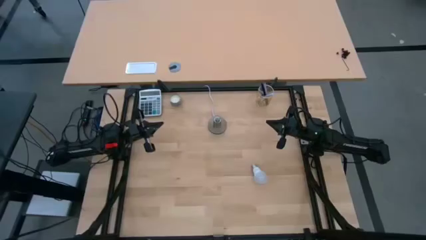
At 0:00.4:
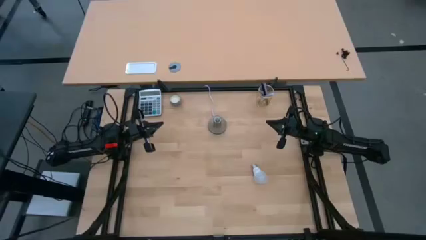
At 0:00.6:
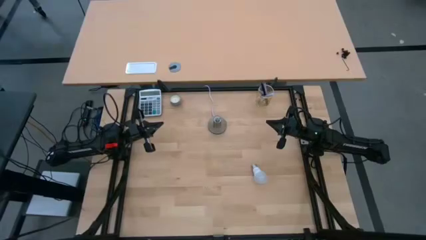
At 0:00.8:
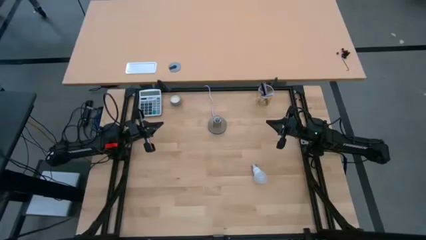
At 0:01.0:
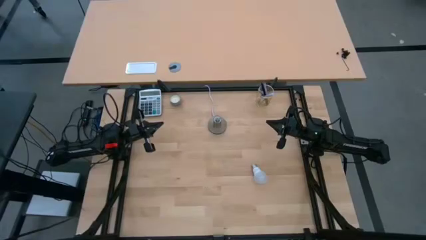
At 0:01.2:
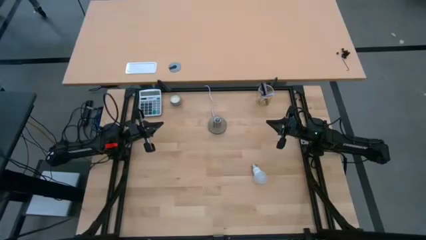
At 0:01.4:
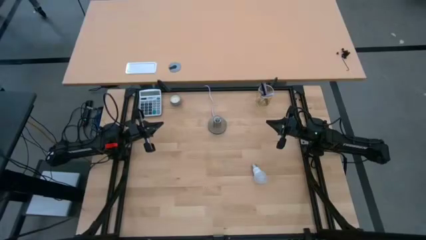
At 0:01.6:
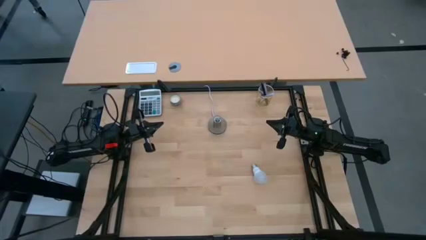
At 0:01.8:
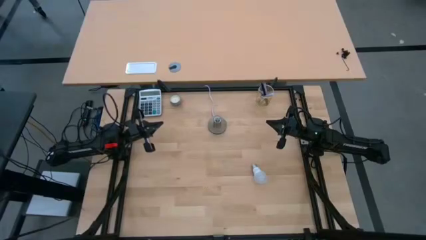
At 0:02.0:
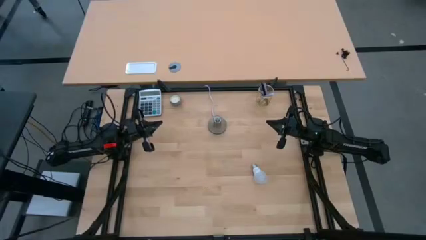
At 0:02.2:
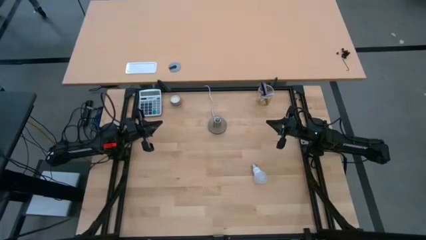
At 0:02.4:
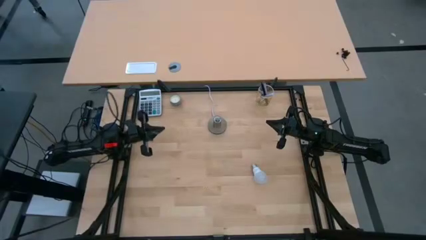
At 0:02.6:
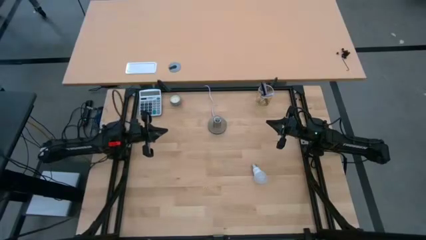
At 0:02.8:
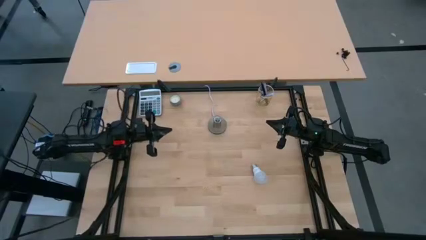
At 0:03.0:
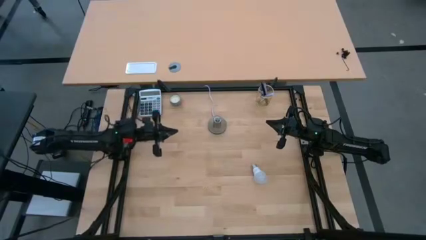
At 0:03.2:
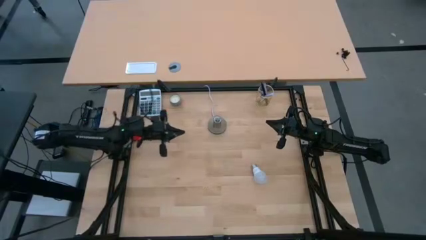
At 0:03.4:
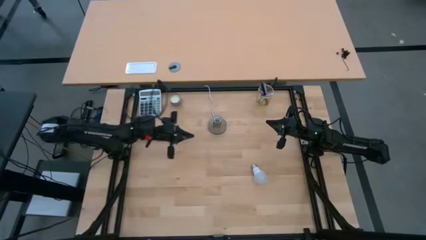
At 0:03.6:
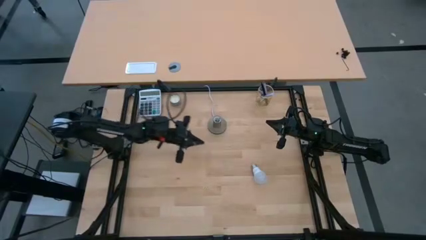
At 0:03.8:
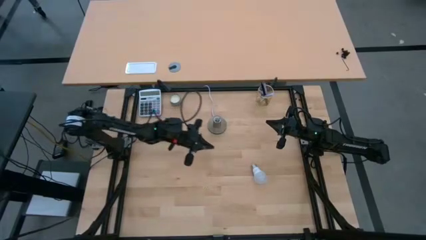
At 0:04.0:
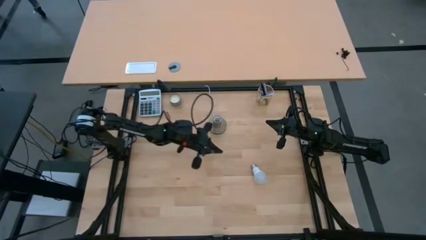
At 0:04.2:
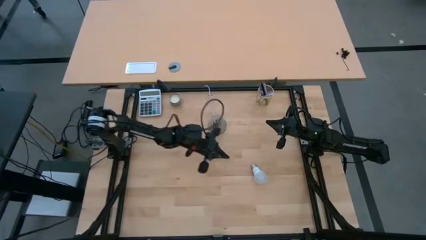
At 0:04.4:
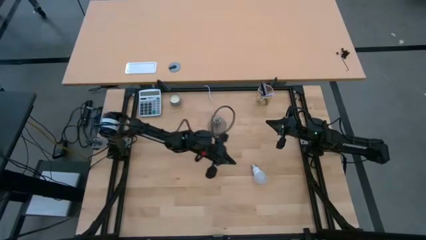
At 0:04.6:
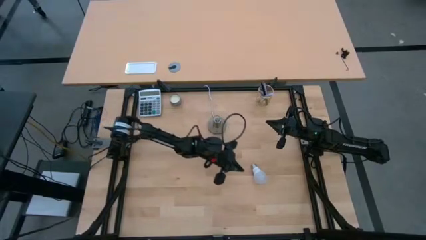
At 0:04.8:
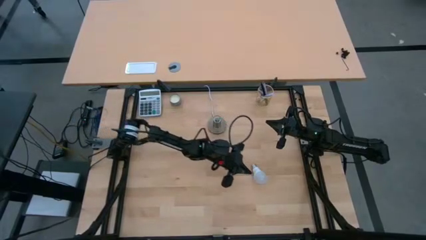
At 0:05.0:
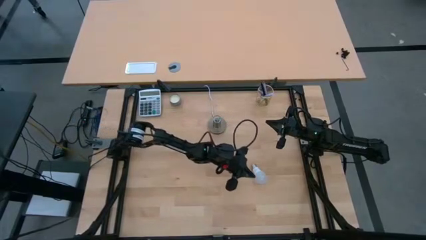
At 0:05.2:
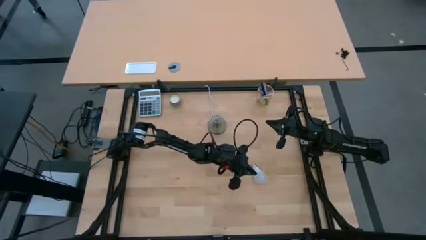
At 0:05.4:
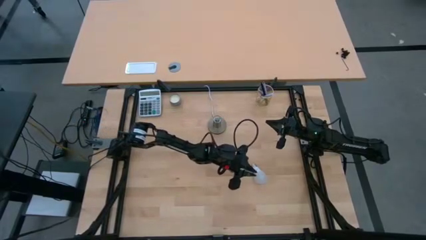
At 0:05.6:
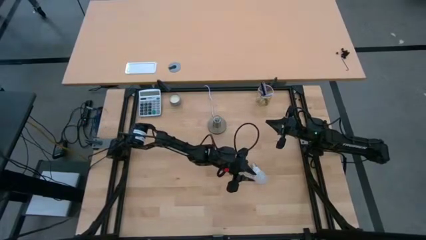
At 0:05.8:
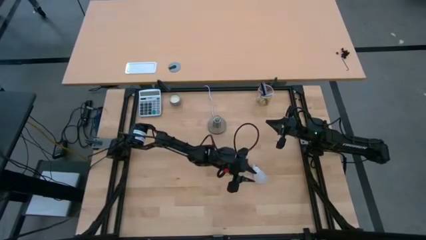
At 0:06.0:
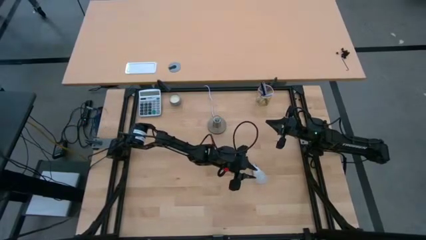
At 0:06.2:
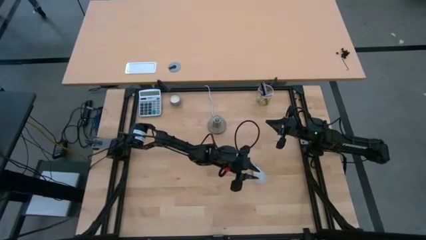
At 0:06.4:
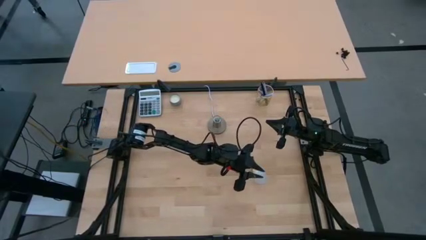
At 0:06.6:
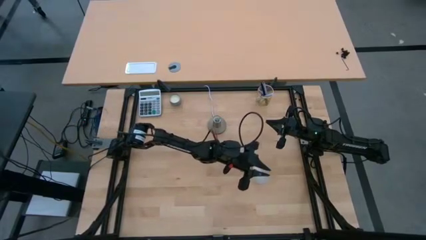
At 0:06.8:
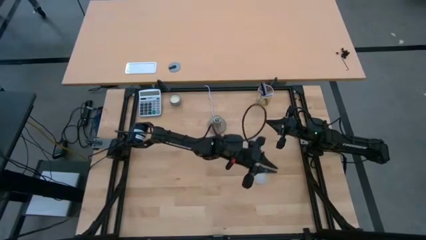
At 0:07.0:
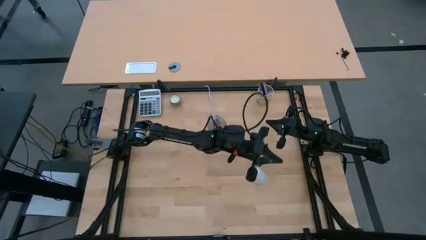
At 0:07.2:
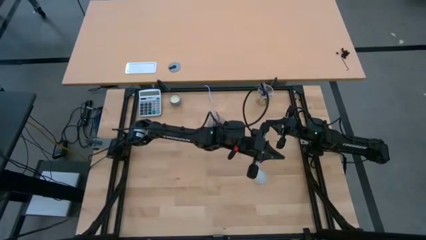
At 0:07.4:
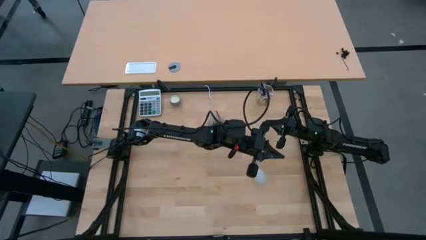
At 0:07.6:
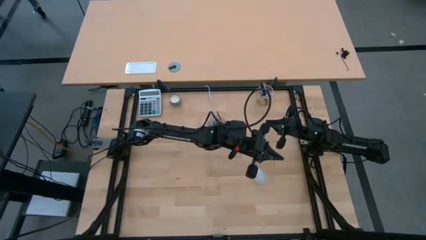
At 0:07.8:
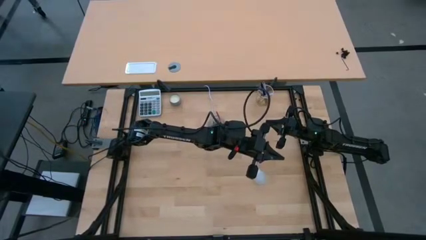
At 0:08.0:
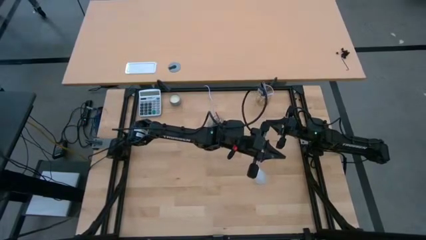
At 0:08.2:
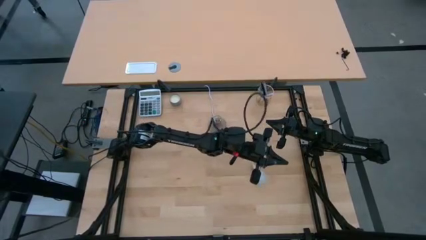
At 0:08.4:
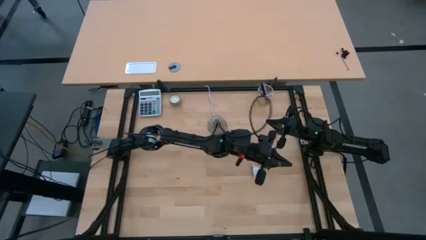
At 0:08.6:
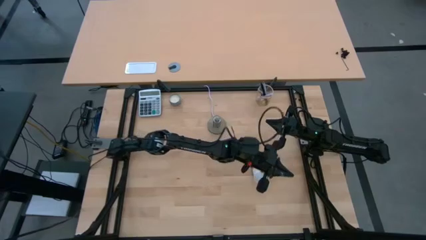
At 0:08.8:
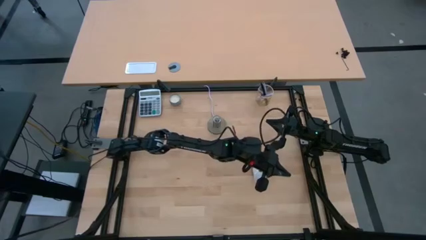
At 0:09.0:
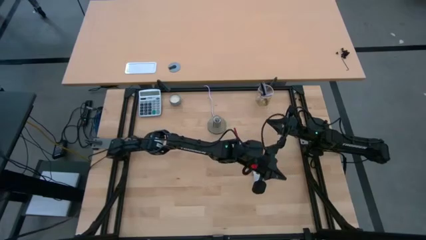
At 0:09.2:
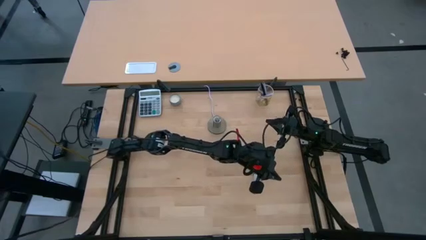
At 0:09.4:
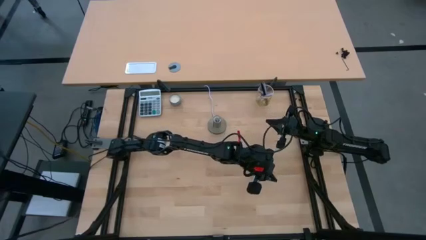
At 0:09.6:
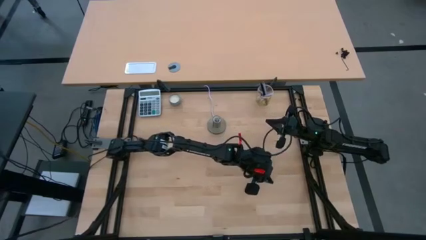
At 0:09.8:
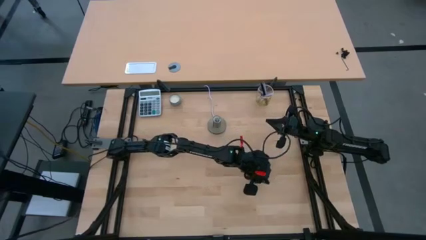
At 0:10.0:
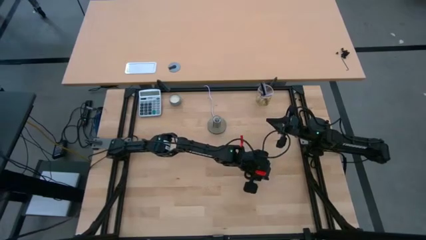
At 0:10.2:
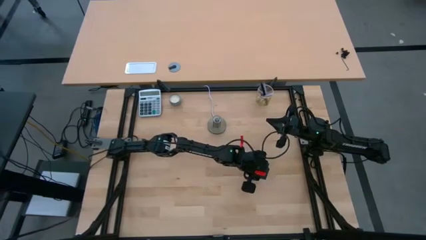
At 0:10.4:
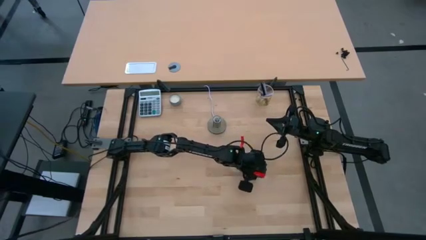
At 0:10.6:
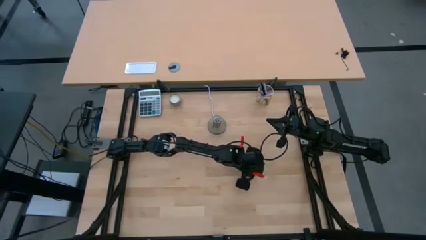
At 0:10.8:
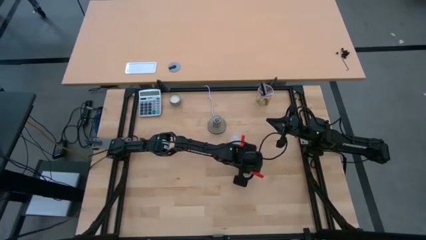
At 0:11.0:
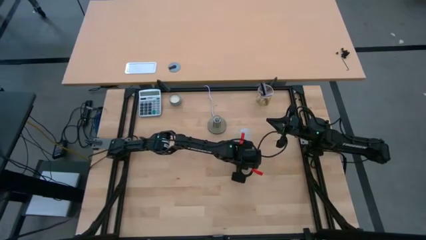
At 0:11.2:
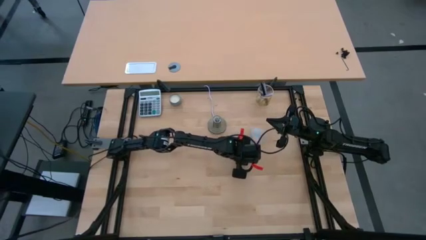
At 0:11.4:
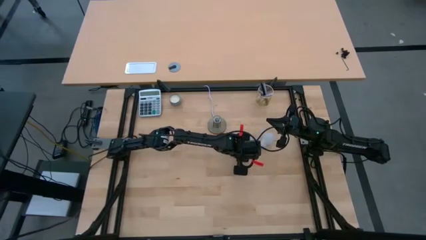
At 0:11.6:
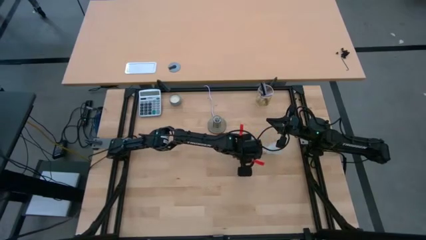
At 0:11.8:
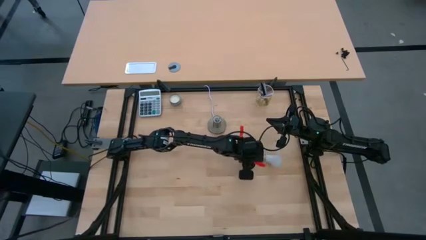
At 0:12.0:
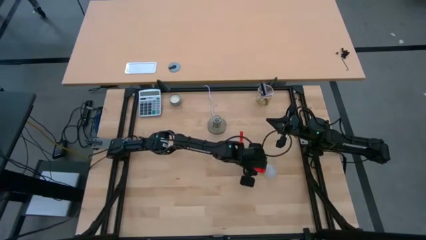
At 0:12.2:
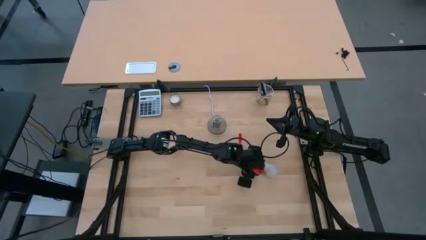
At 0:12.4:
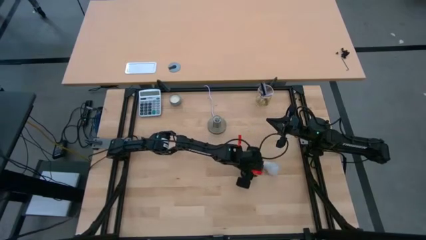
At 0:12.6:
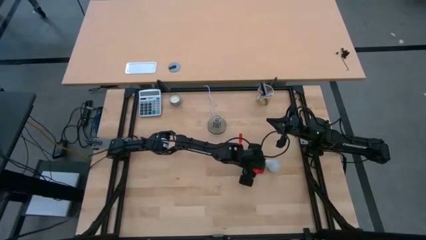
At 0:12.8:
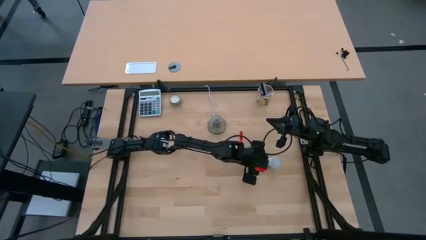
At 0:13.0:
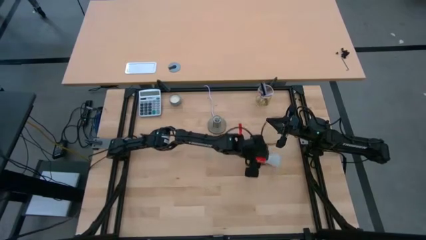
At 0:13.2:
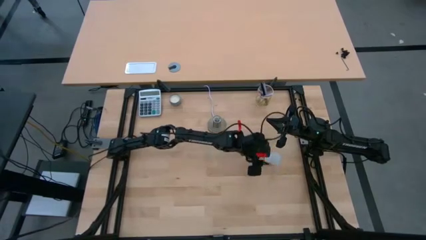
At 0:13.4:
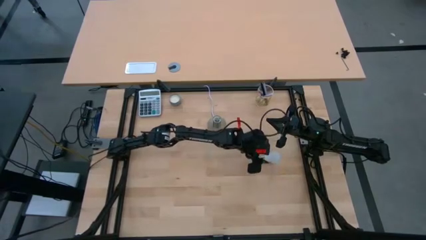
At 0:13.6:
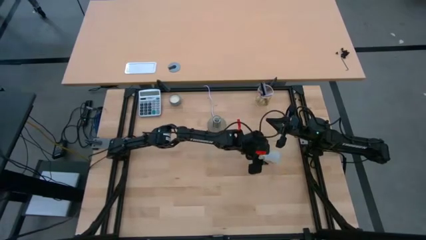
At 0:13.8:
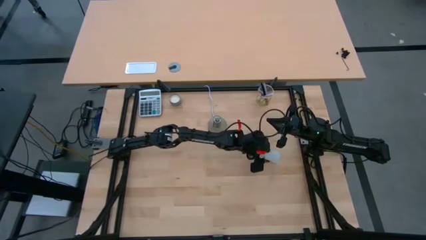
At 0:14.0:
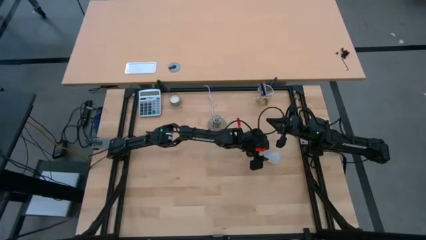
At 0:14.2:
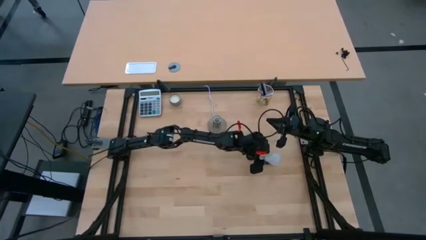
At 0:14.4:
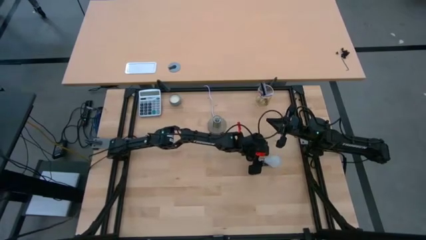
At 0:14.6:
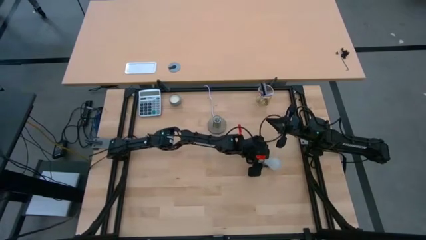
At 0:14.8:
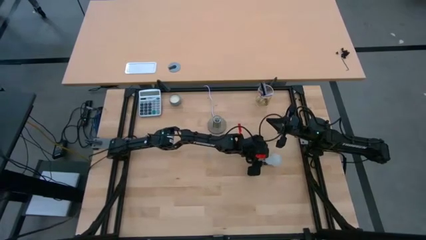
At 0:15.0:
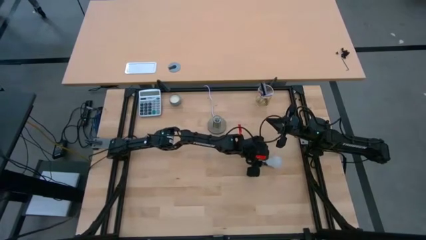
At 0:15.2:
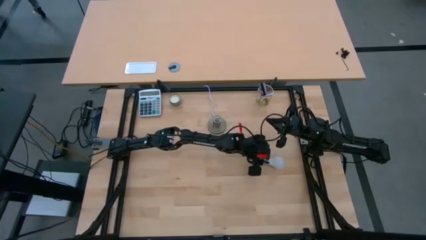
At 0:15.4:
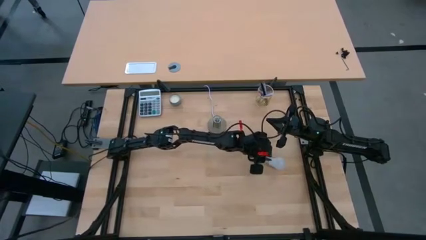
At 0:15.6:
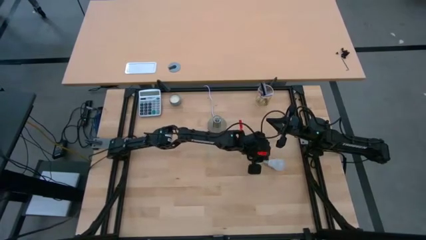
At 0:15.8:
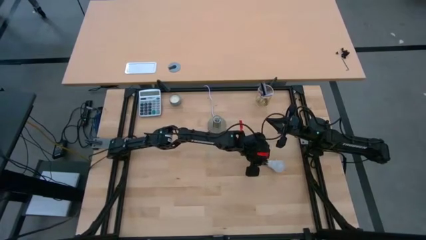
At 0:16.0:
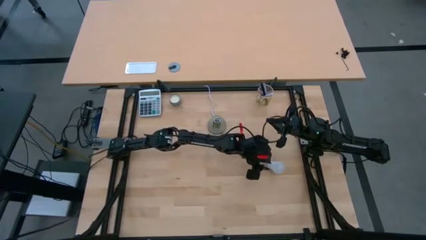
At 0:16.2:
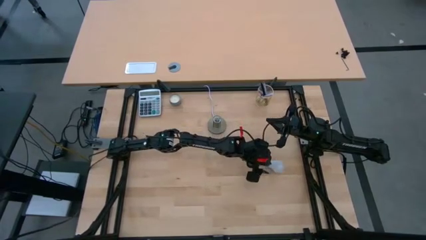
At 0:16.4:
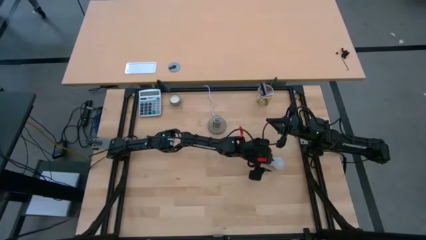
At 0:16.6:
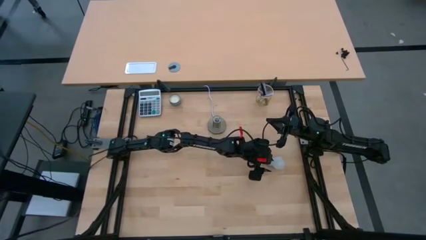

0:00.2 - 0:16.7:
Task: Screw lightbulb
Insert the lightbulb into the lamp
